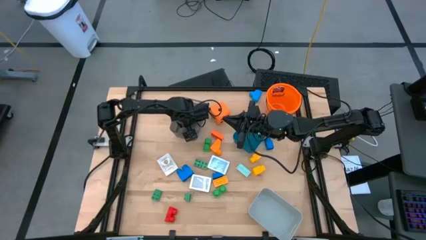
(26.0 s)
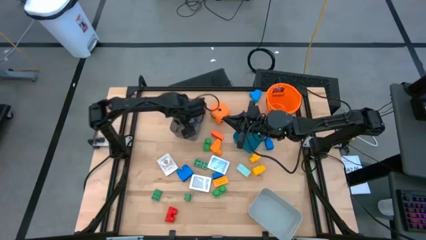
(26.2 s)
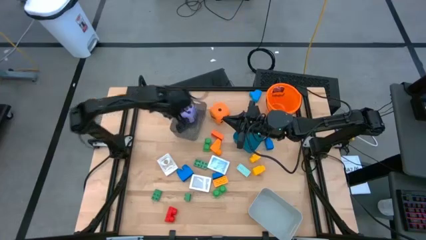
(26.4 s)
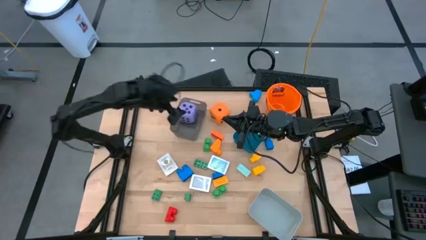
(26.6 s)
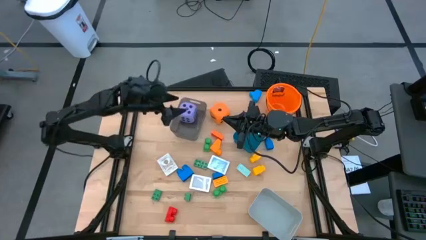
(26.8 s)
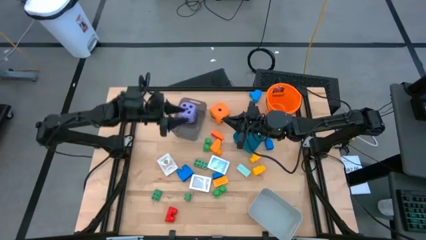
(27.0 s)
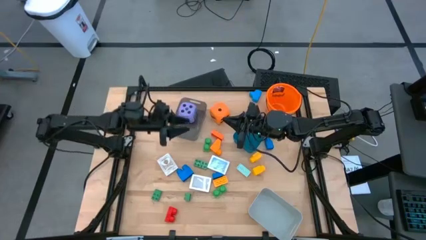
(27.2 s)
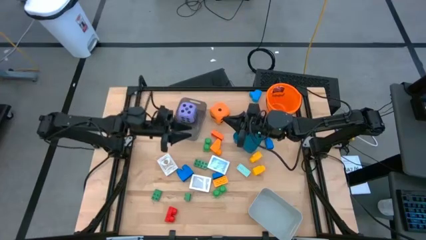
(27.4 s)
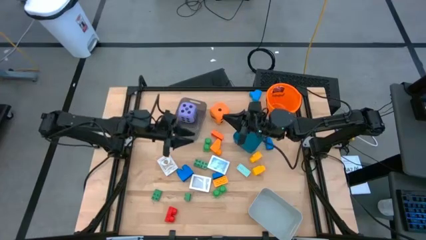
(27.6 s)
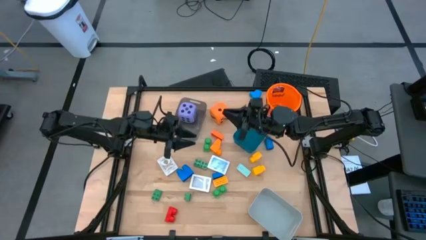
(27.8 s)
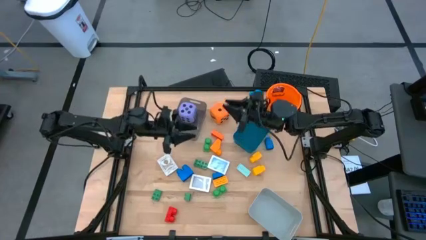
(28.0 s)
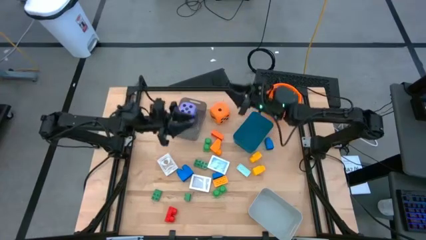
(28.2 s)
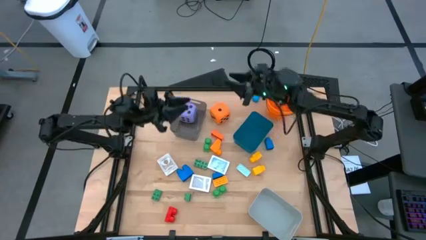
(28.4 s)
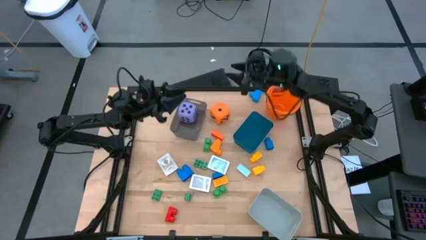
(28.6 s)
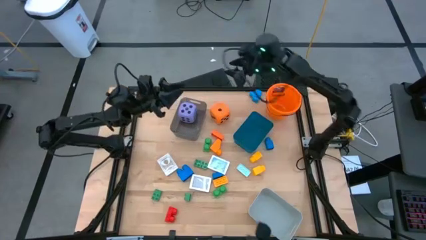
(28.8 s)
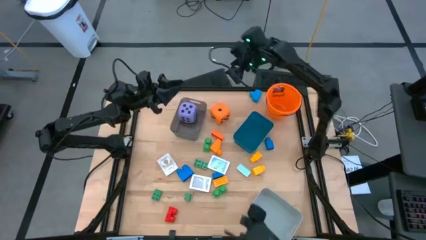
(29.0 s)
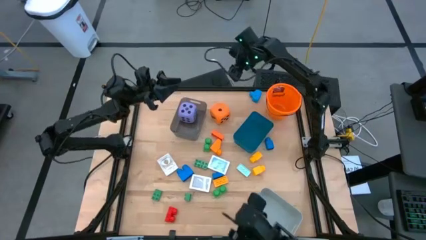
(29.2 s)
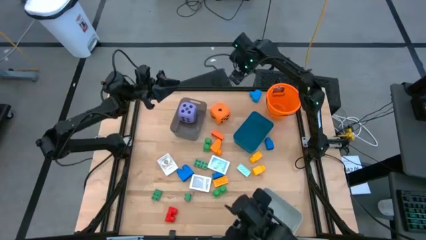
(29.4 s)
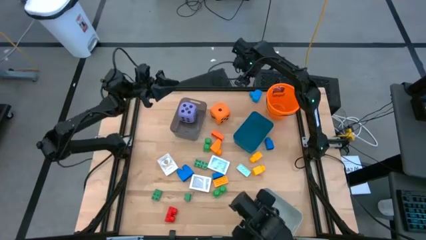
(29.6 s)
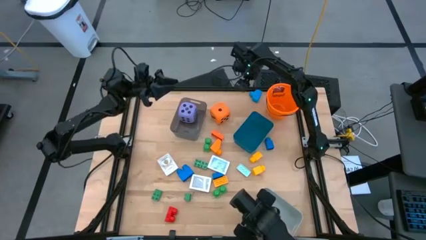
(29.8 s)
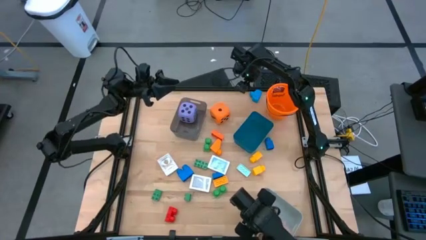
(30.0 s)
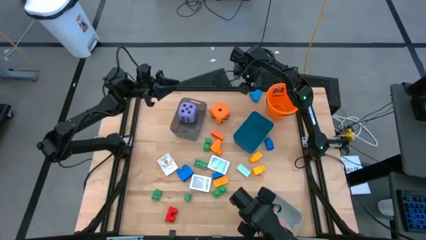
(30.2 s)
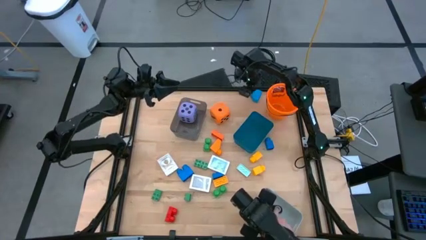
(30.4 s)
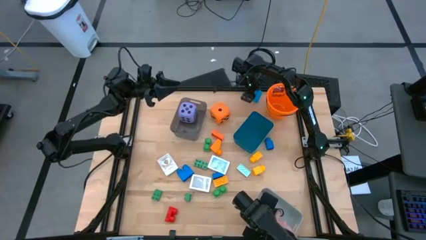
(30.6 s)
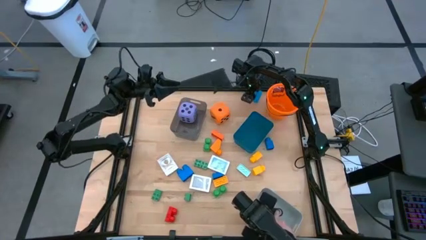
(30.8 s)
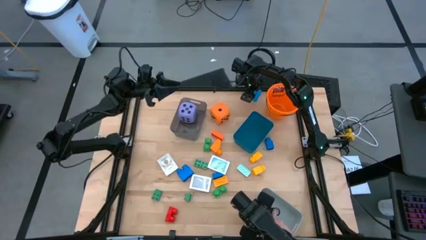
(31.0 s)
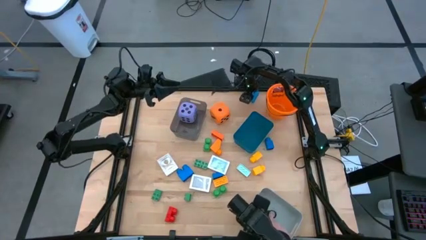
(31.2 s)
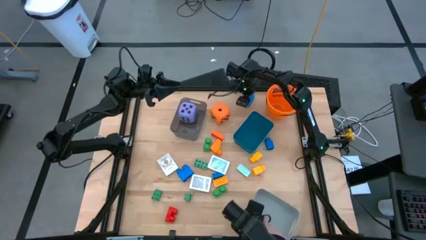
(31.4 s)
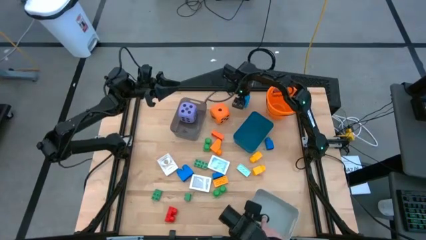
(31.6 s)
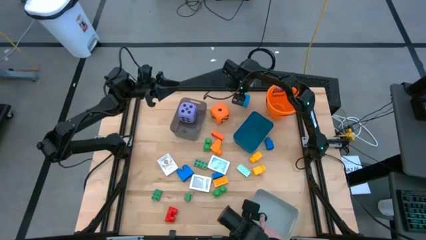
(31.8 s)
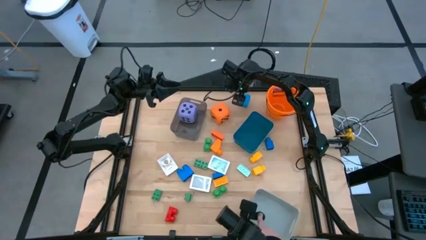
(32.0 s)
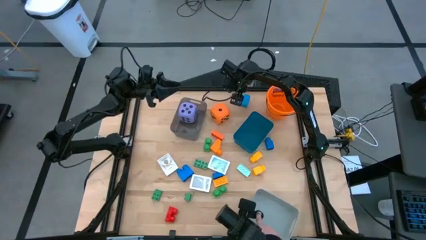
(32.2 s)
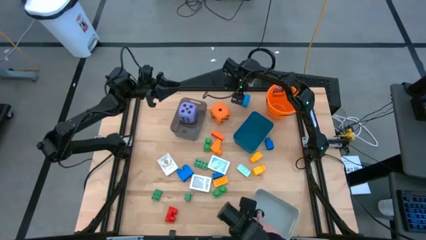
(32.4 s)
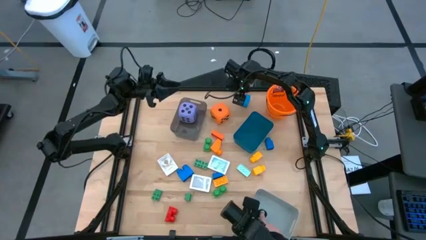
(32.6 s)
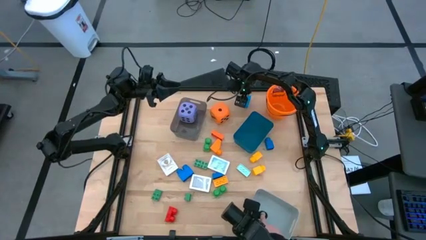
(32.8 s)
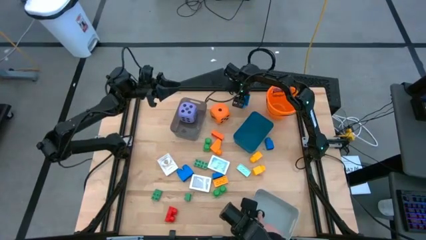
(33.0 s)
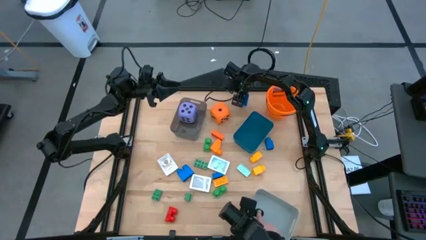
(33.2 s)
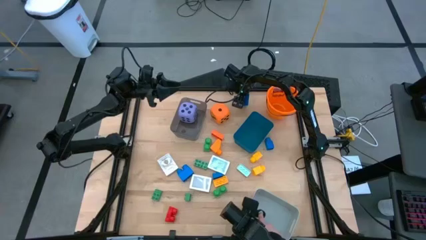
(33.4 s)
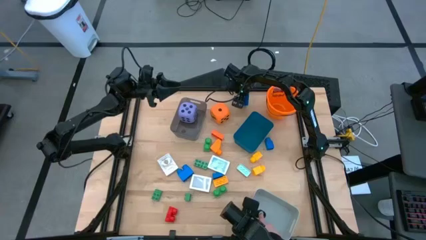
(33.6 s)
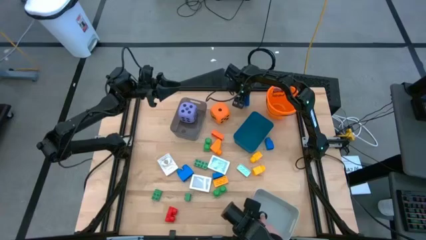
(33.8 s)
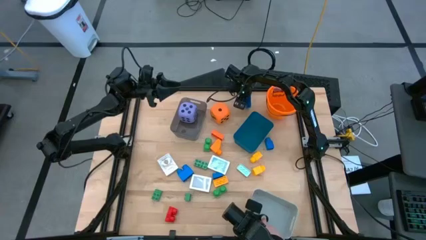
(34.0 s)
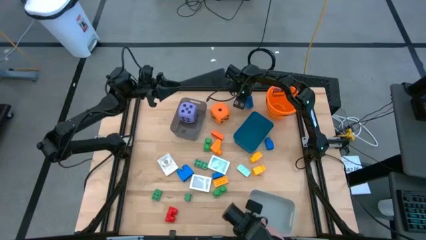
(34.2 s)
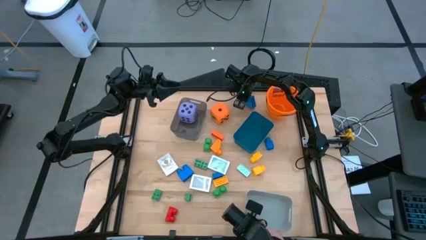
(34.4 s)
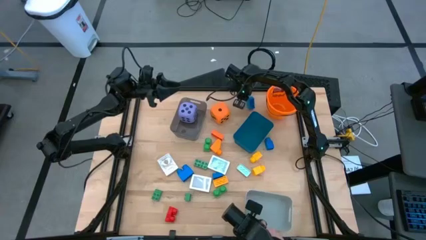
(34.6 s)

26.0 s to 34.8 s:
Task: Pick & Place Toys
Put the blue game piece into the blue bin

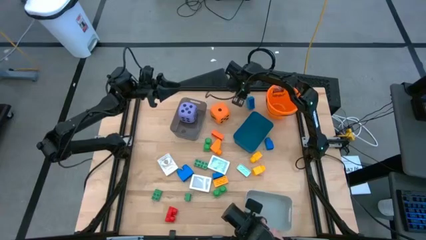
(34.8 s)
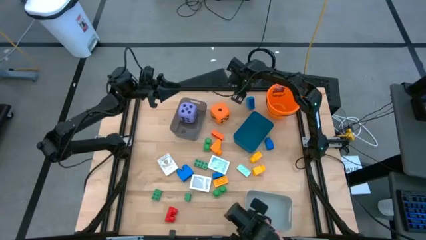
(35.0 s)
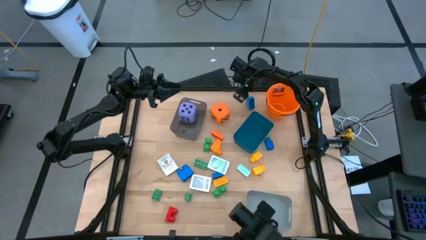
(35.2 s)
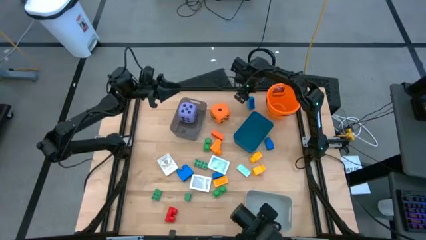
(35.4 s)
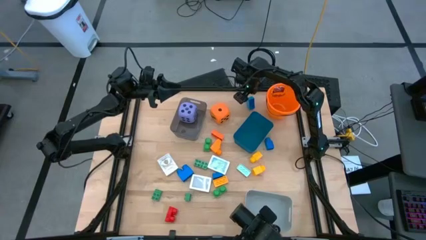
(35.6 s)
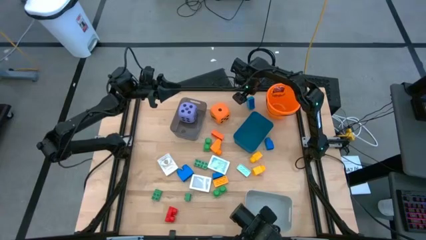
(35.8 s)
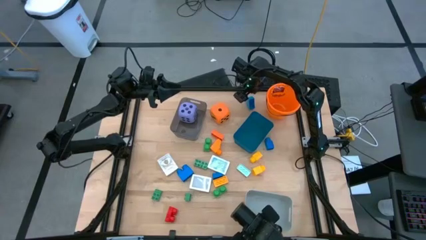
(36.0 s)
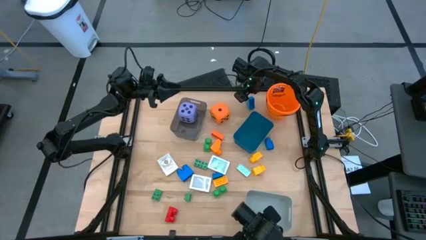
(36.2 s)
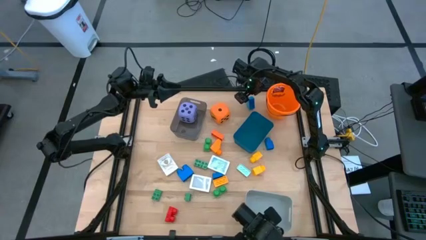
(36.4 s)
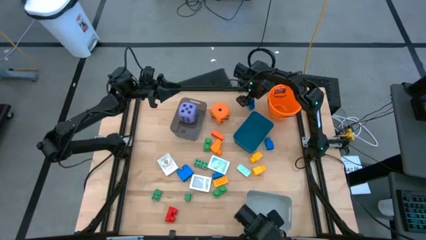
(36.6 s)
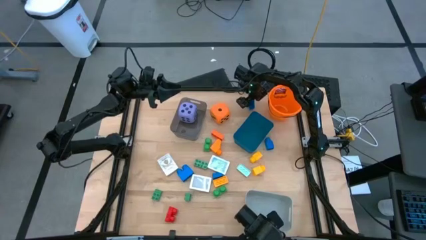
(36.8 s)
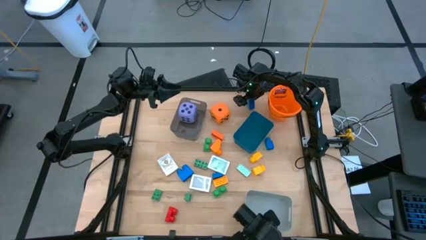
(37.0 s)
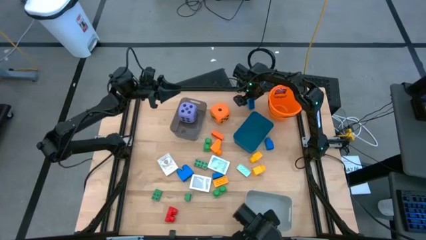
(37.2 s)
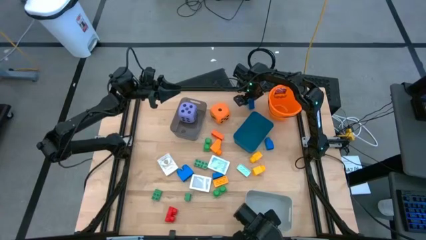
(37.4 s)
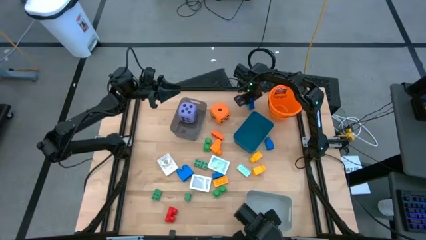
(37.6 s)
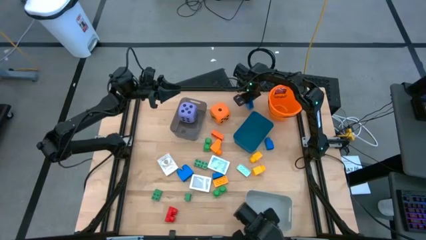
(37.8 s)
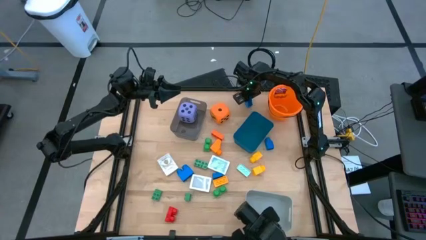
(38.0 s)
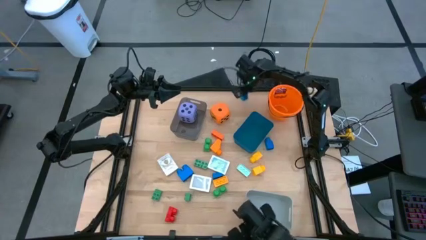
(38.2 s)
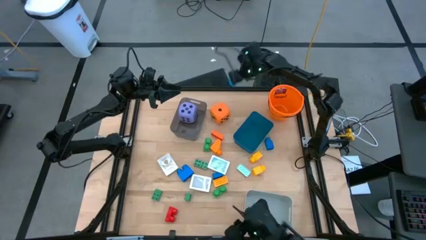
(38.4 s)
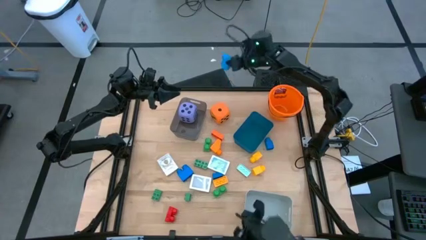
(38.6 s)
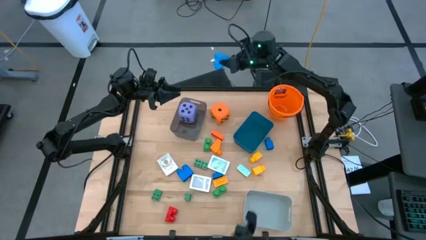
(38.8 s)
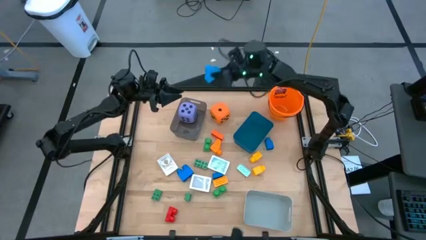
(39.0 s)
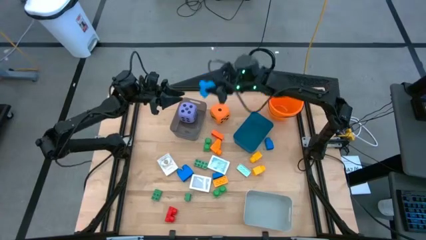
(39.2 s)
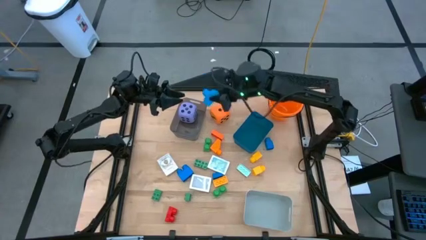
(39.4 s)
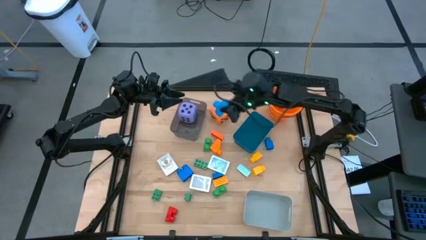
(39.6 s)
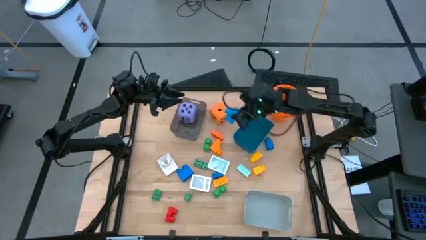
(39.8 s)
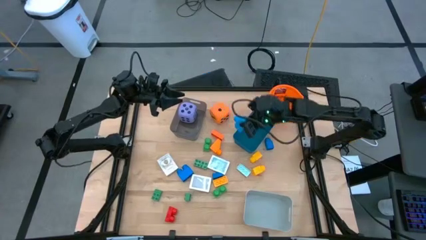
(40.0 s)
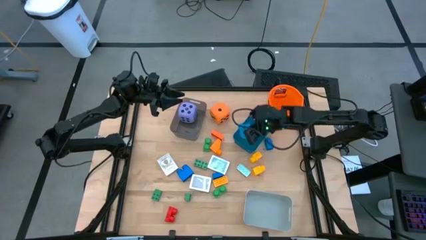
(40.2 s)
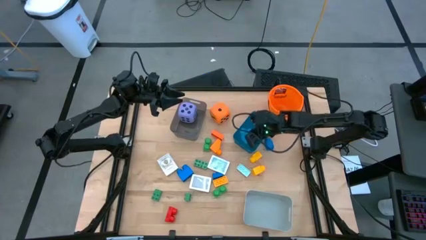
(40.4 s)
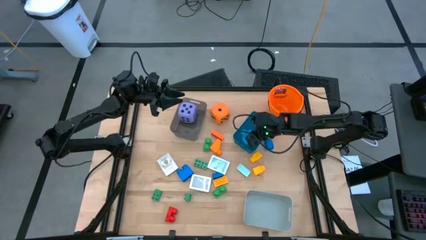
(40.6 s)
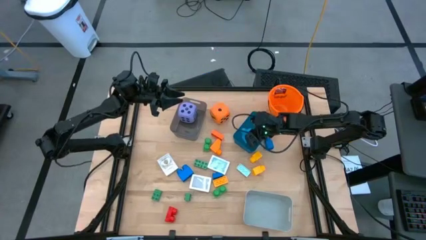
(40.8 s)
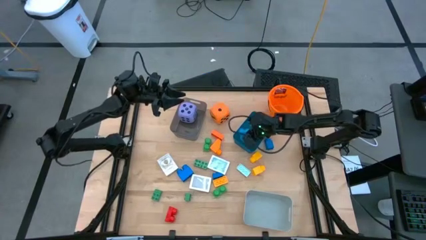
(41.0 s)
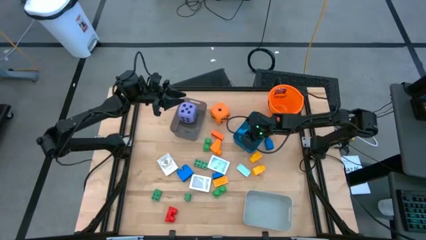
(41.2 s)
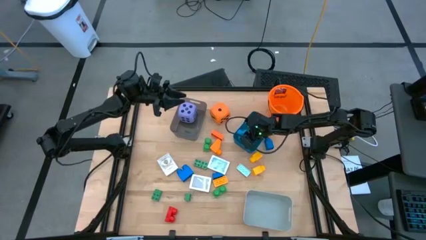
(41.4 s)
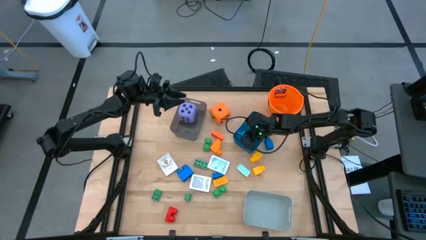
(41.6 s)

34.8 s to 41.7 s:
Put the blue game piece into the blue bin
